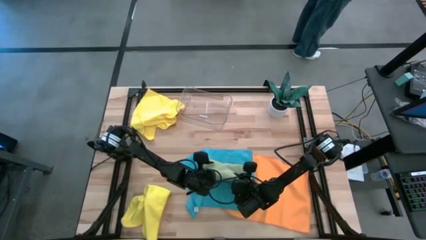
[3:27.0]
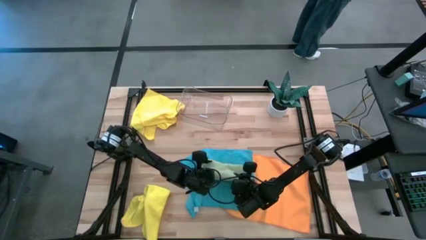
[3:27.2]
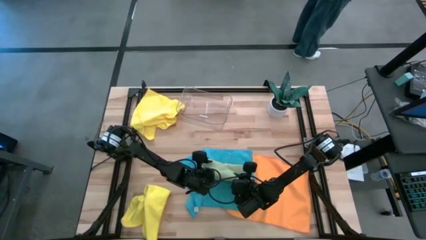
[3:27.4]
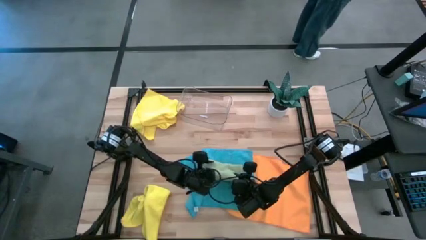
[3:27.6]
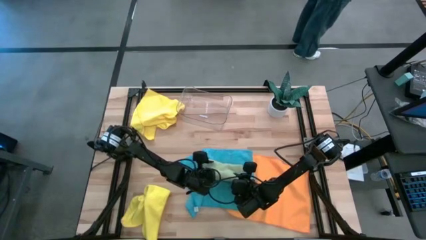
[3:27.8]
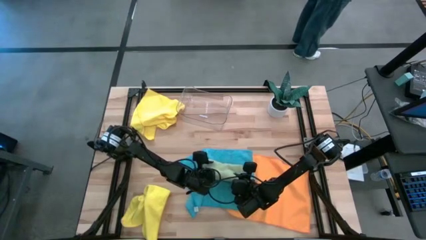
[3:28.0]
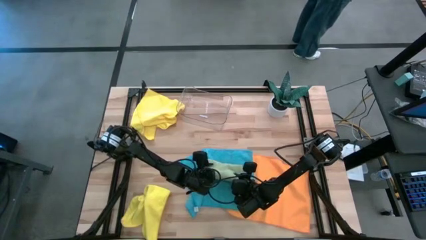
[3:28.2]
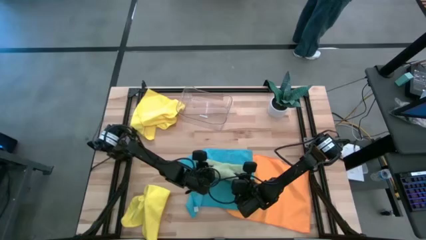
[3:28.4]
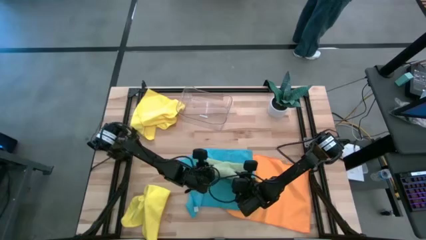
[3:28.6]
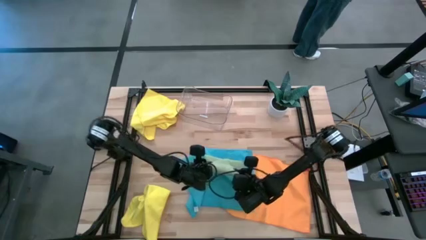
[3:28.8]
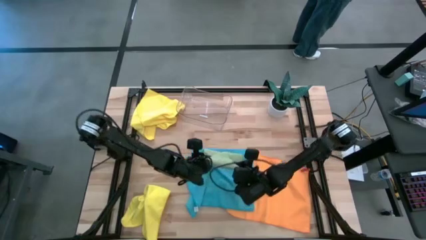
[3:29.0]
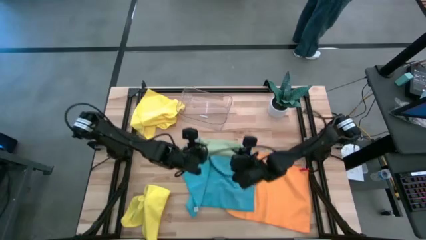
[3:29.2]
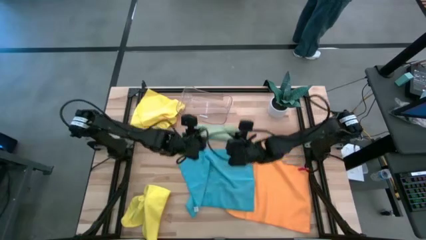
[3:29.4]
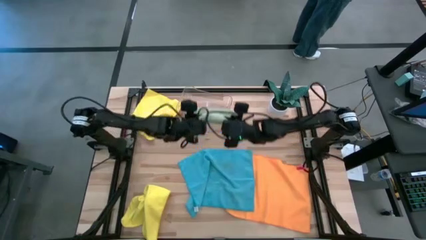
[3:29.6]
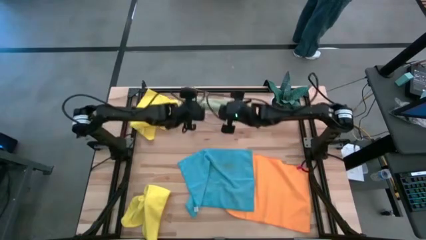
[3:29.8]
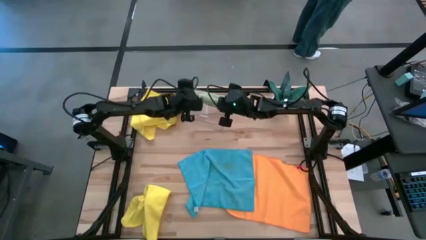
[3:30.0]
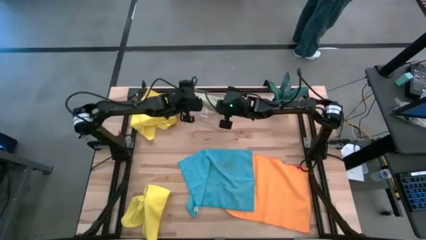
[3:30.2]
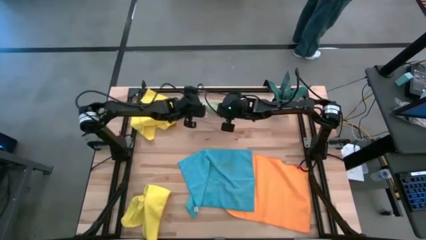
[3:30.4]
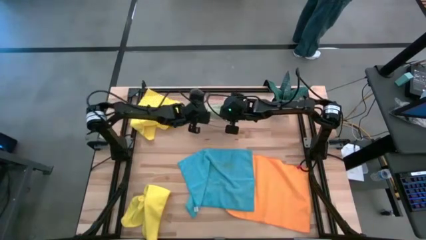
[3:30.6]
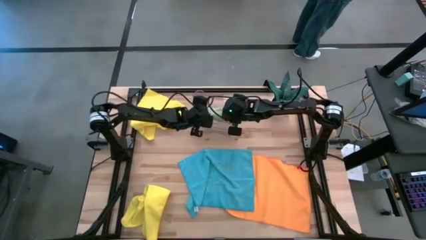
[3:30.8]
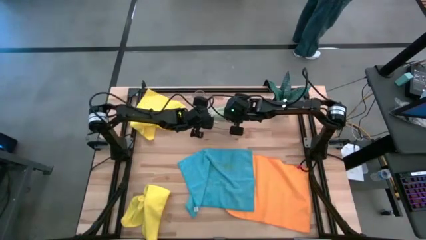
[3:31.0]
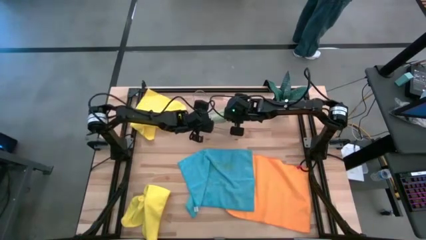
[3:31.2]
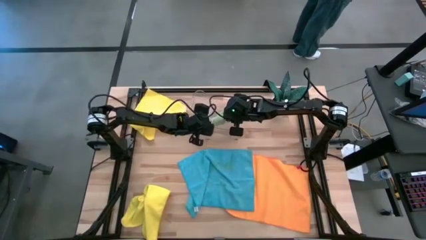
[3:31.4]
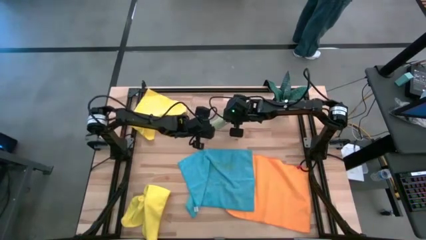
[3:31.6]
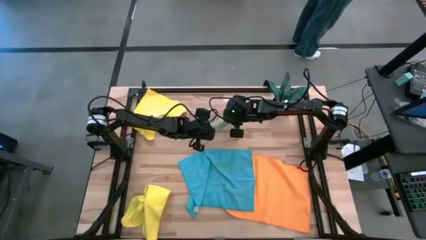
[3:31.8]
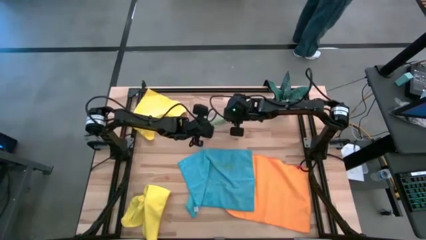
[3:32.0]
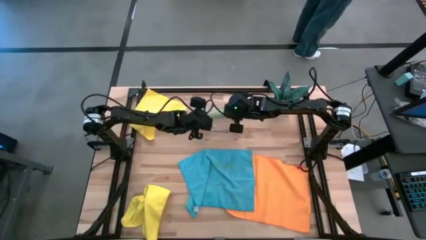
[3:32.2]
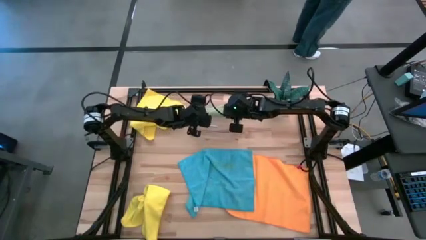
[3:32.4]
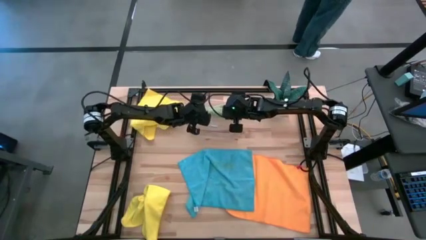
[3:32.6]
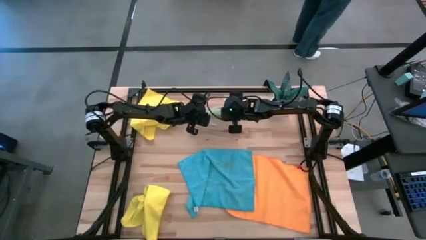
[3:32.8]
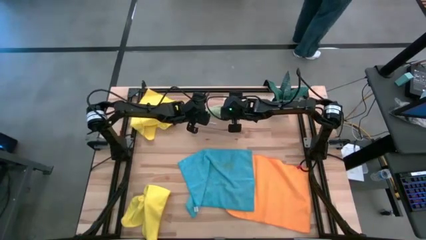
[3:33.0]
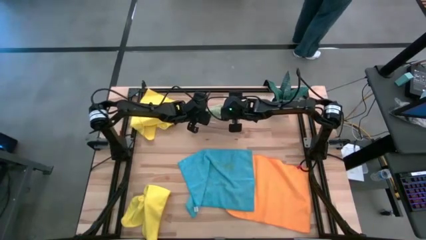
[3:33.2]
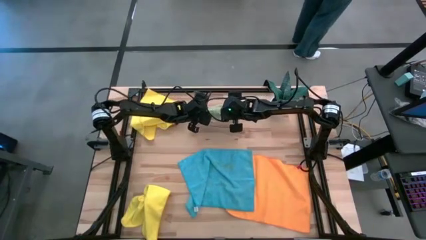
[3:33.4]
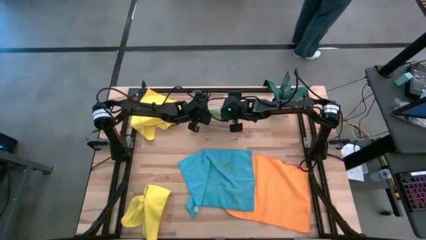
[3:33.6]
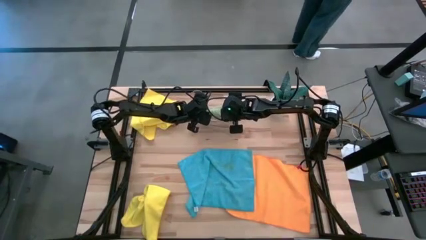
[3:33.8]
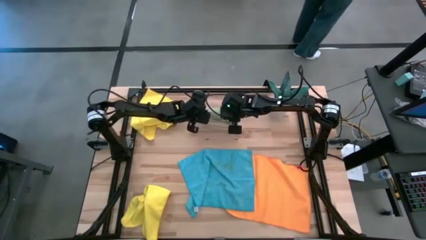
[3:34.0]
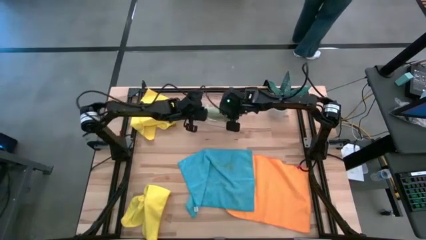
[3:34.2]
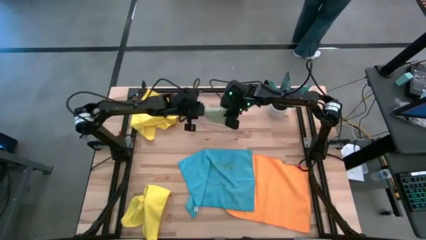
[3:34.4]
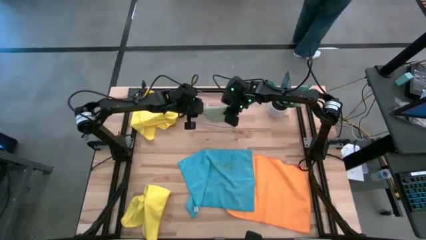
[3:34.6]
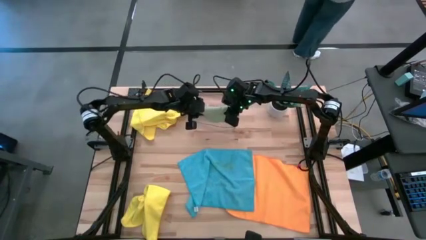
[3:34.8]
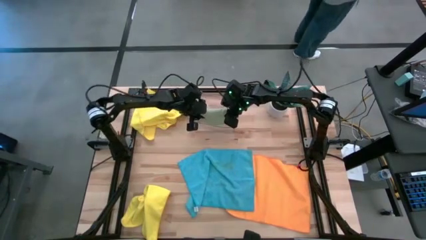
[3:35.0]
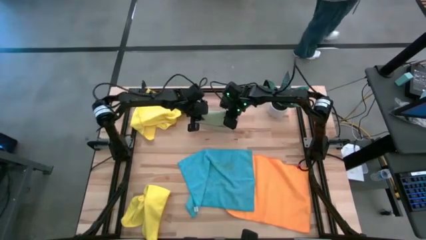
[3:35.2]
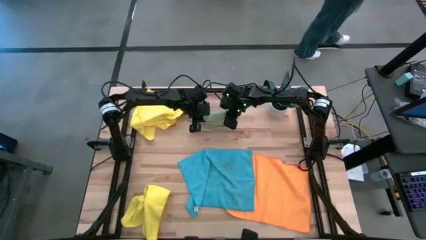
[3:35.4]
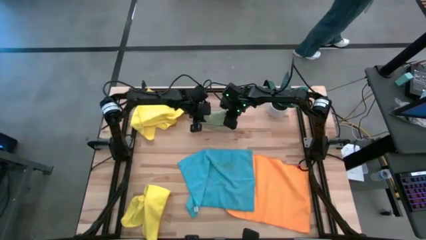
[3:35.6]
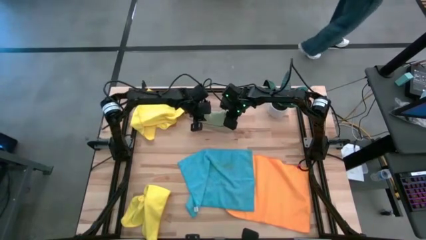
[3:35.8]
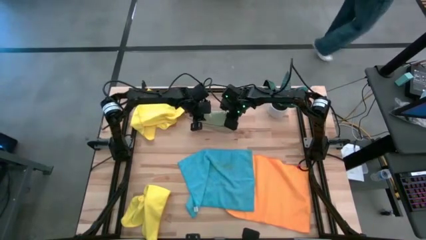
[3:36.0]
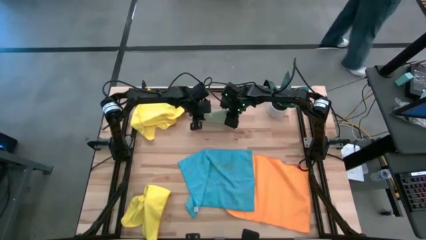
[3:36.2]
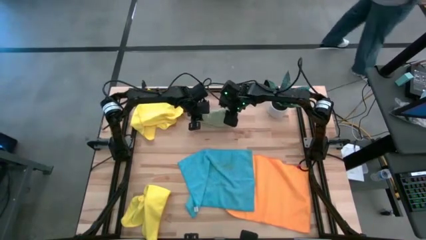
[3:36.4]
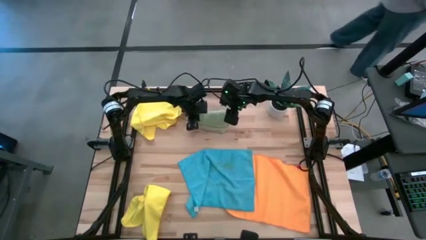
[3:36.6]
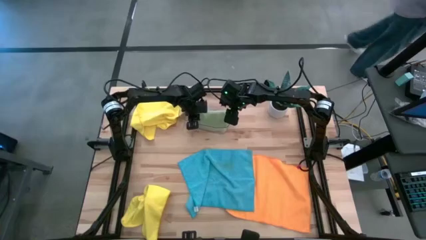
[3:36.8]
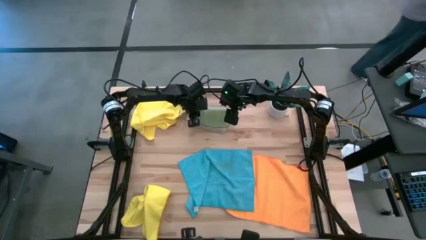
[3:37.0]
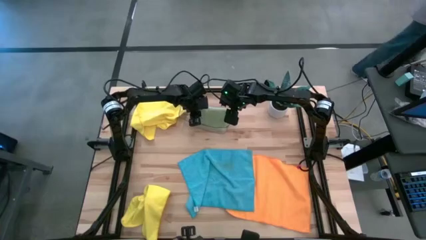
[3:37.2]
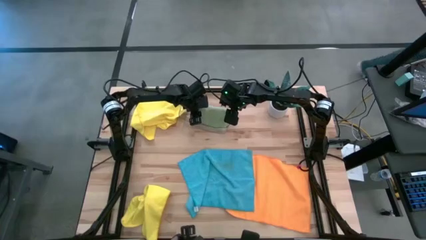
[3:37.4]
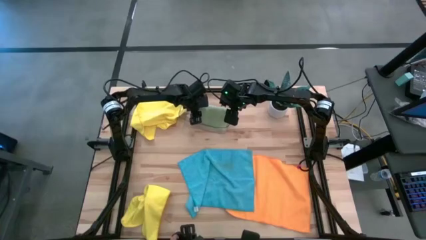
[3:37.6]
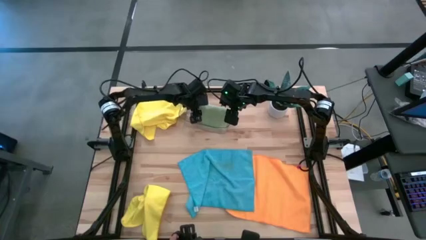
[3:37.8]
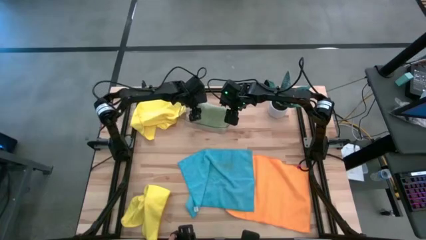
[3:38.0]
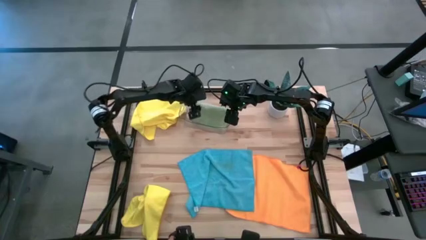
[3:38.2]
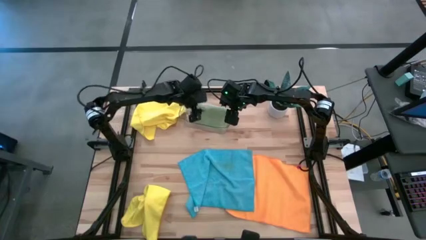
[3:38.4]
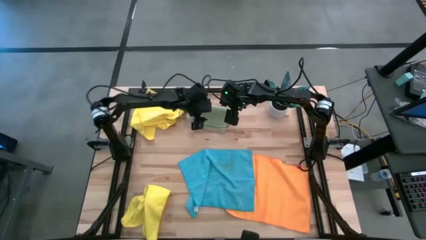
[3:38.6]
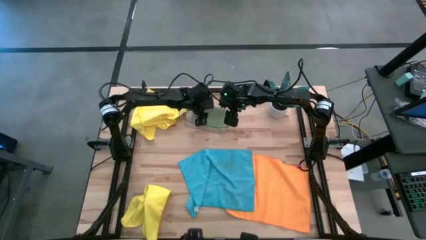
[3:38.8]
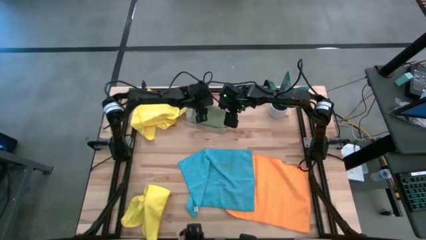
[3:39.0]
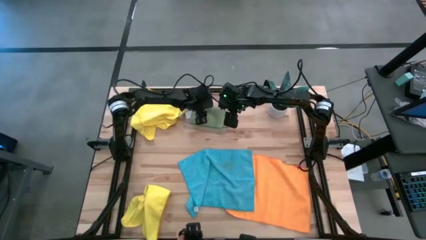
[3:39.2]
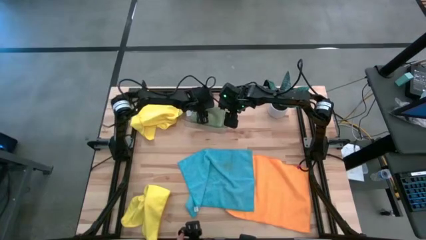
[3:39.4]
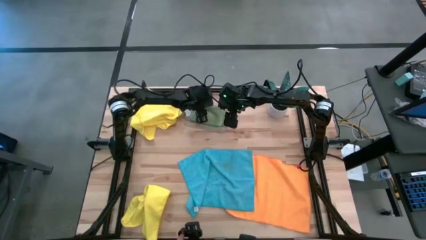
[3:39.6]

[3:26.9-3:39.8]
Task: Fold microfiber towels
Put the green folded towel into the transparent bin

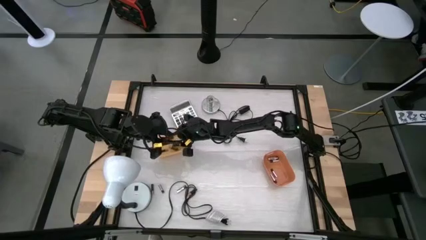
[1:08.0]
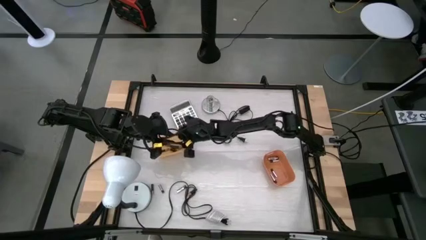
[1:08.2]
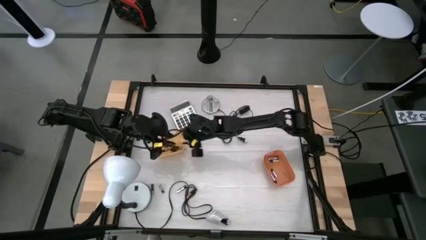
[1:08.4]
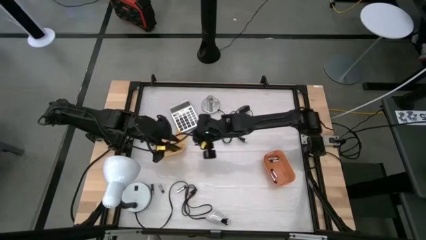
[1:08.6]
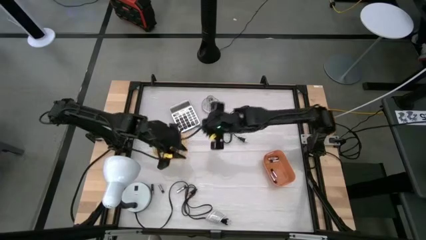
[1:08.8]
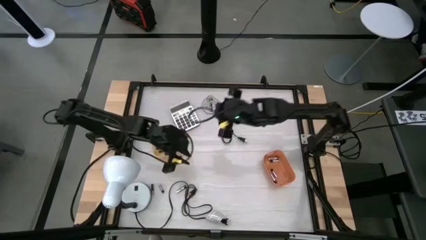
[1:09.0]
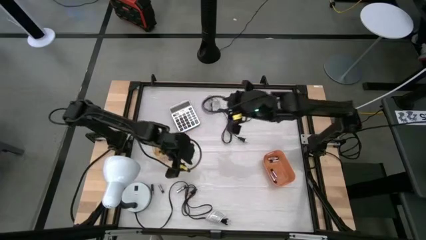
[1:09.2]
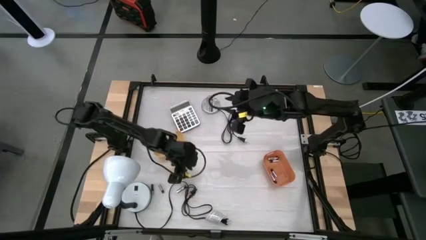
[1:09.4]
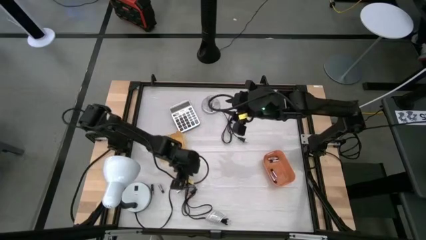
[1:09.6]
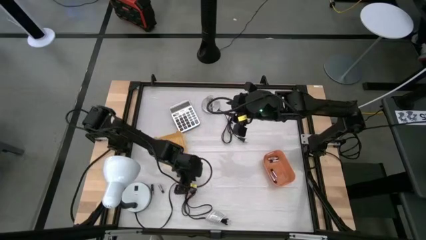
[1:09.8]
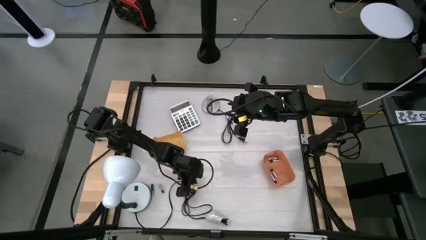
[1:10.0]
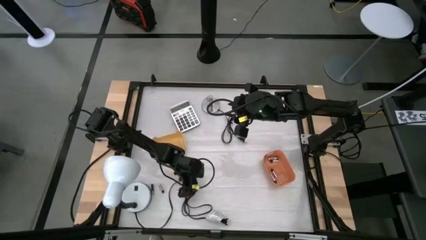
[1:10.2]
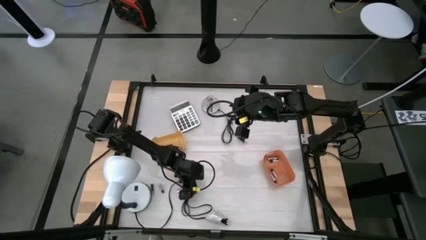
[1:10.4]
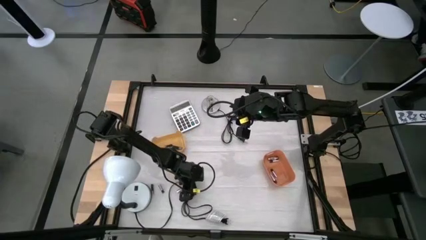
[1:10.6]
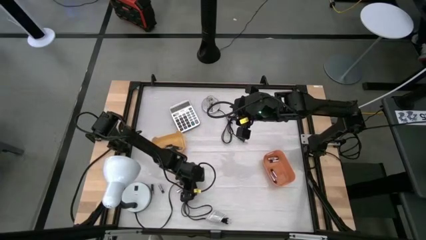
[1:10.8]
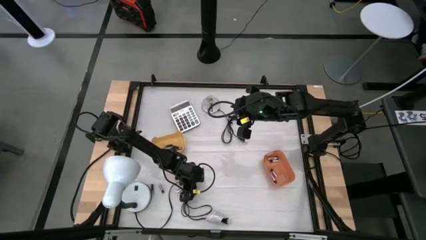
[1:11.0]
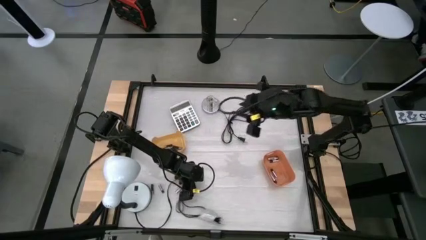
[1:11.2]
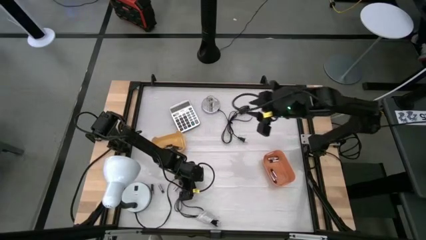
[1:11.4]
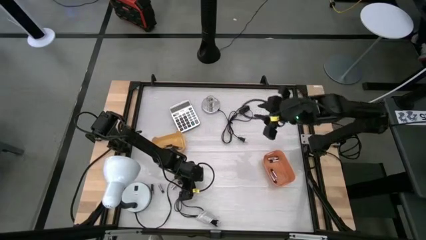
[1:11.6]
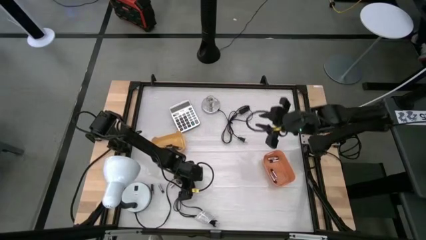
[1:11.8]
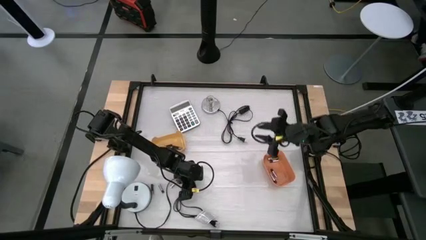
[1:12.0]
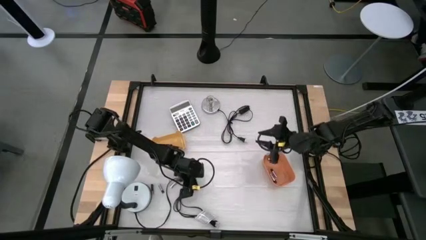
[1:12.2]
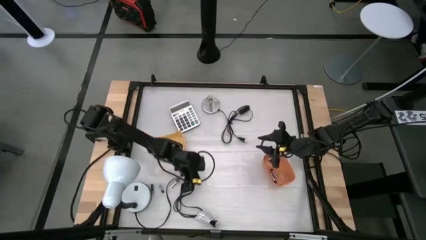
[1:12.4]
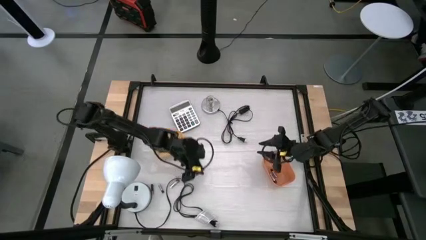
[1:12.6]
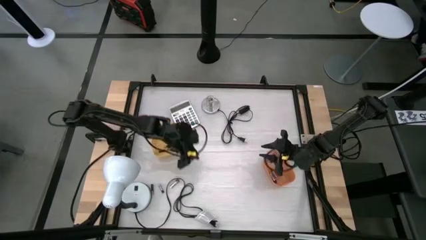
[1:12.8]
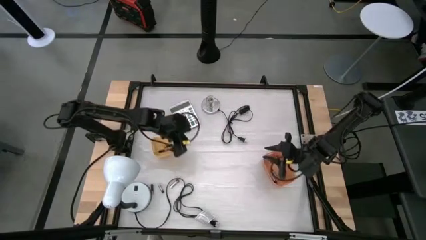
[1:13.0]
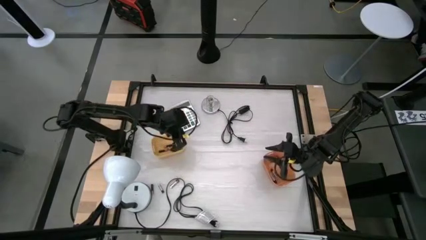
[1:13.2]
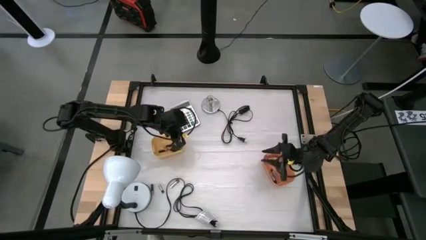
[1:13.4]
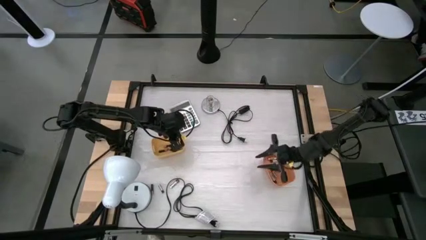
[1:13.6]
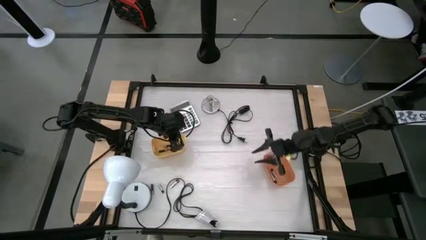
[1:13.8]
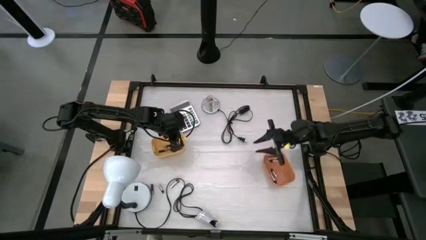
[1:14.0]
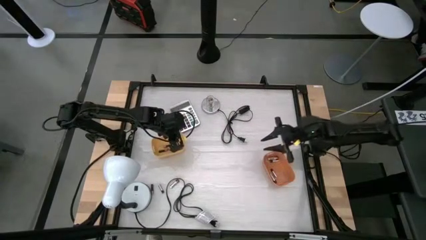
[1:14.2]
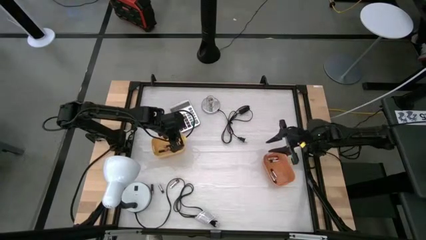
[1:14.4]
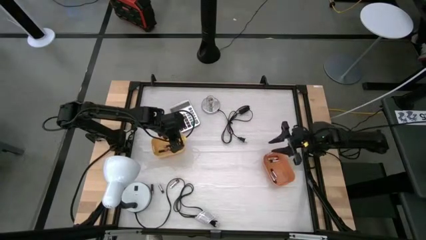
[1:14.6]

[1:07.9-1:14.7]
Task: Sort batteries
Put the black battery into the yellow bin
